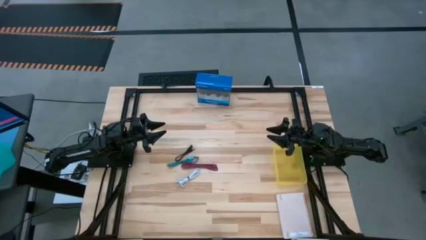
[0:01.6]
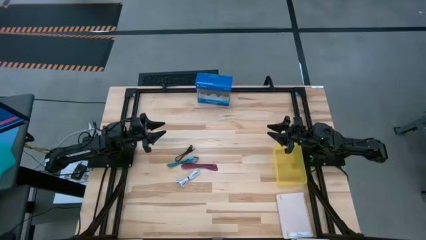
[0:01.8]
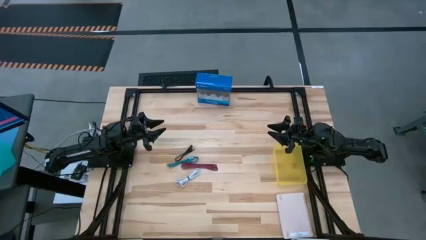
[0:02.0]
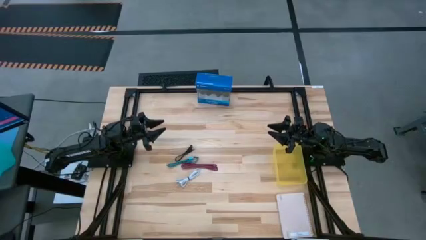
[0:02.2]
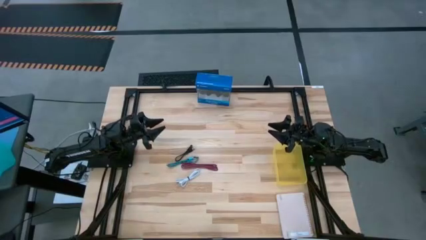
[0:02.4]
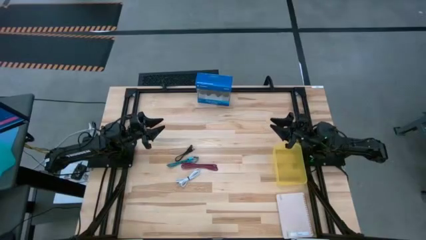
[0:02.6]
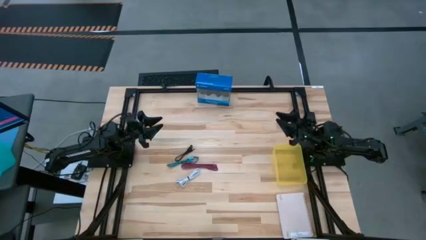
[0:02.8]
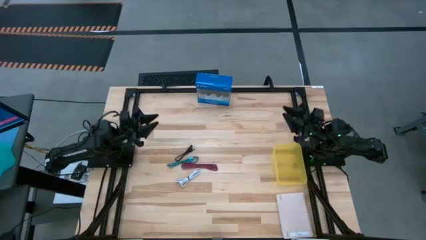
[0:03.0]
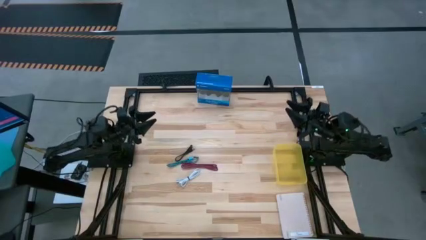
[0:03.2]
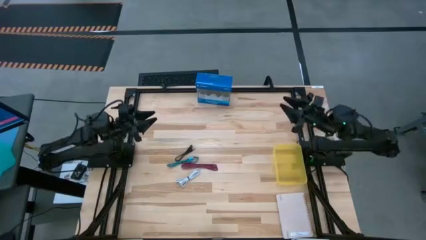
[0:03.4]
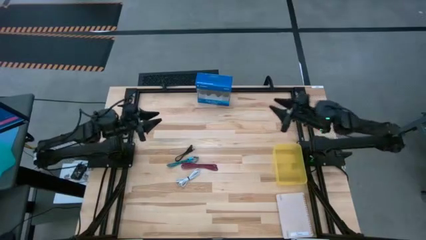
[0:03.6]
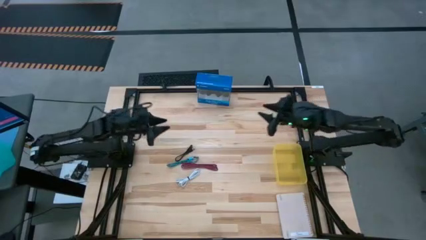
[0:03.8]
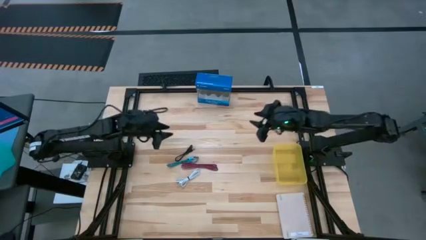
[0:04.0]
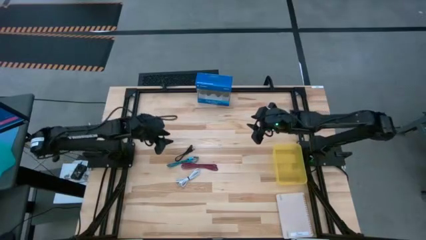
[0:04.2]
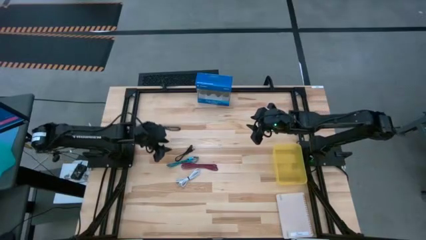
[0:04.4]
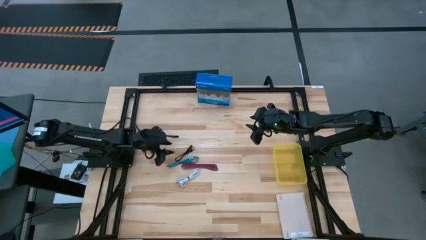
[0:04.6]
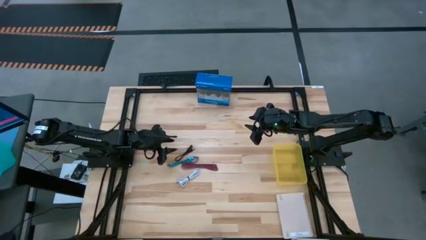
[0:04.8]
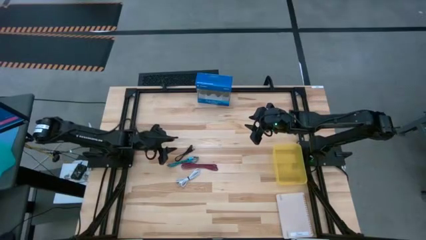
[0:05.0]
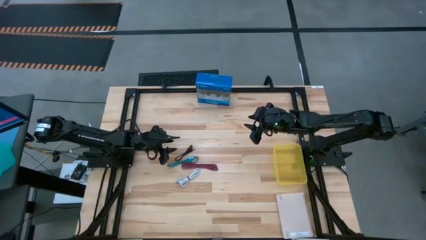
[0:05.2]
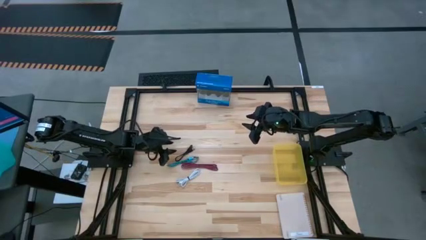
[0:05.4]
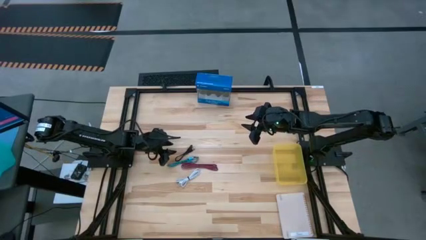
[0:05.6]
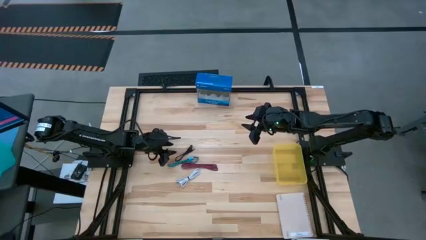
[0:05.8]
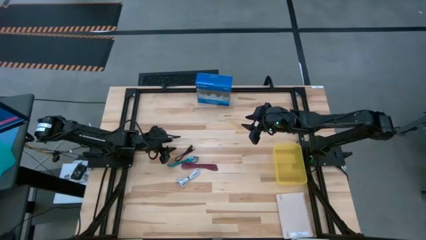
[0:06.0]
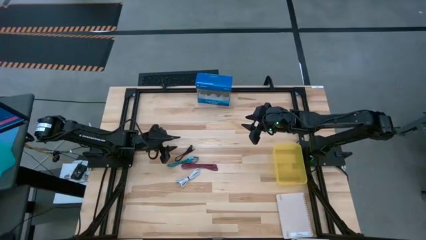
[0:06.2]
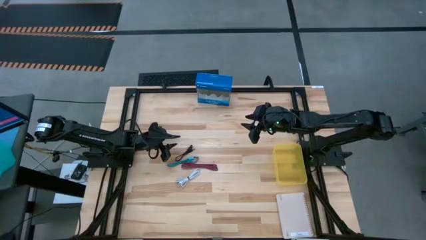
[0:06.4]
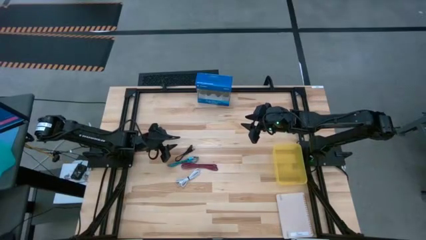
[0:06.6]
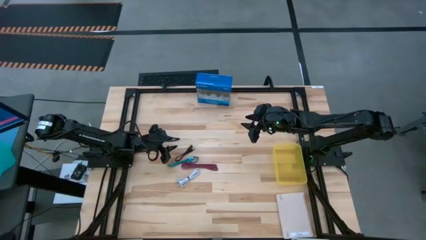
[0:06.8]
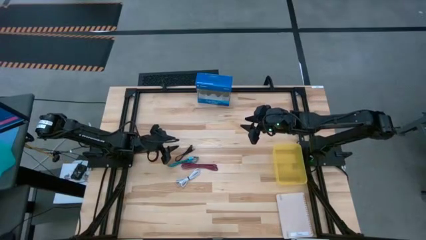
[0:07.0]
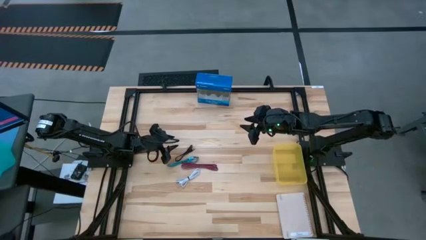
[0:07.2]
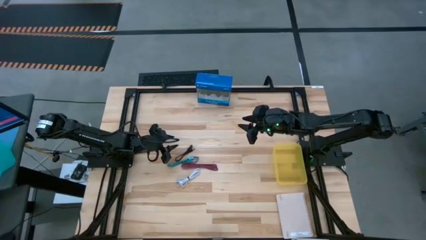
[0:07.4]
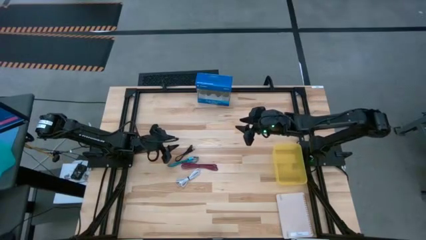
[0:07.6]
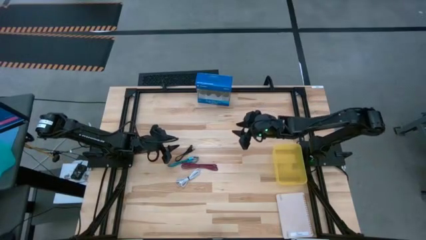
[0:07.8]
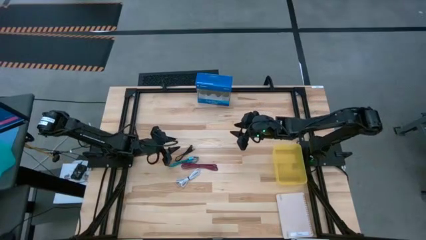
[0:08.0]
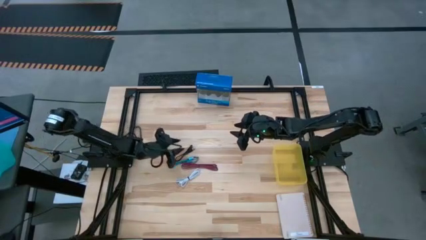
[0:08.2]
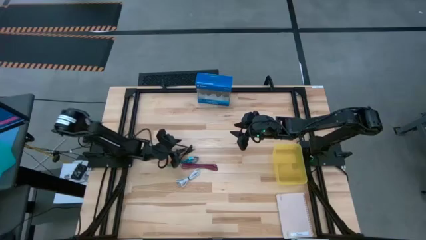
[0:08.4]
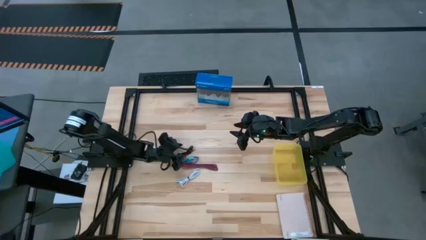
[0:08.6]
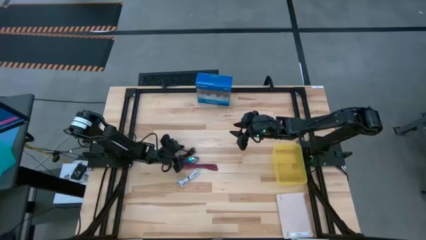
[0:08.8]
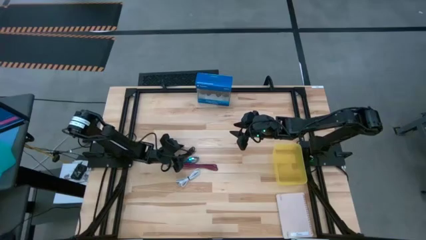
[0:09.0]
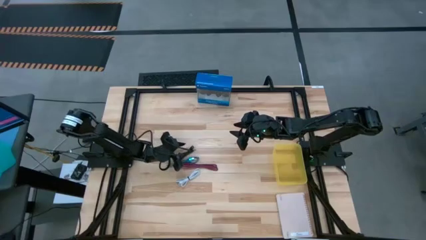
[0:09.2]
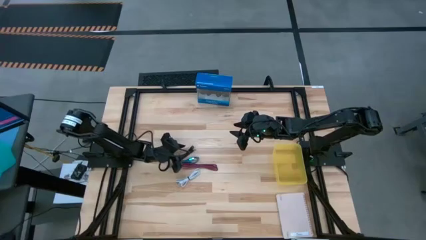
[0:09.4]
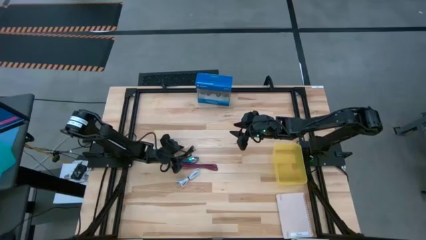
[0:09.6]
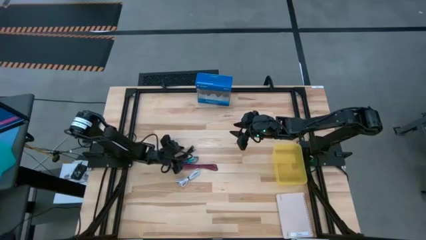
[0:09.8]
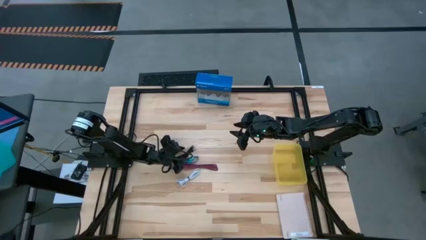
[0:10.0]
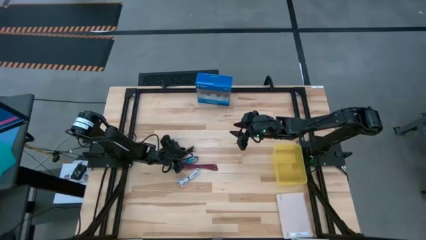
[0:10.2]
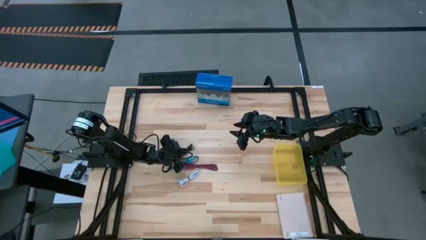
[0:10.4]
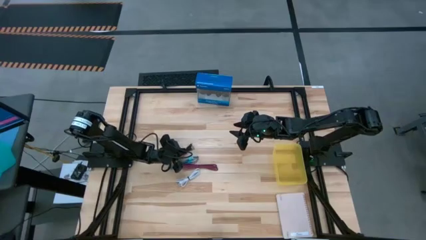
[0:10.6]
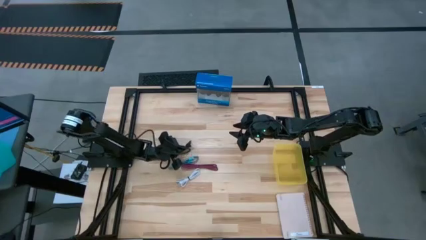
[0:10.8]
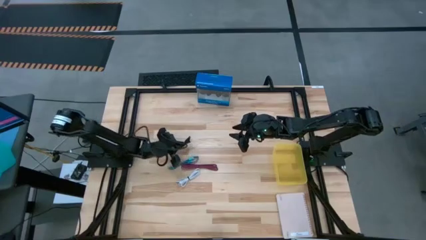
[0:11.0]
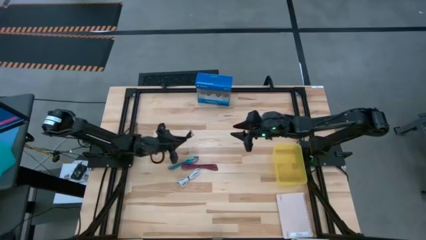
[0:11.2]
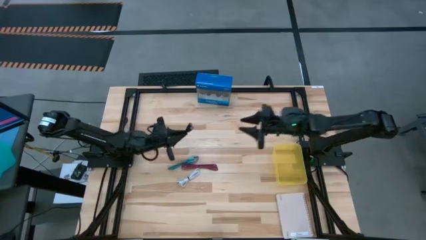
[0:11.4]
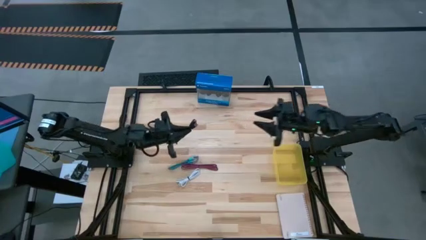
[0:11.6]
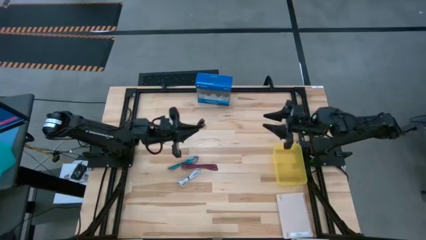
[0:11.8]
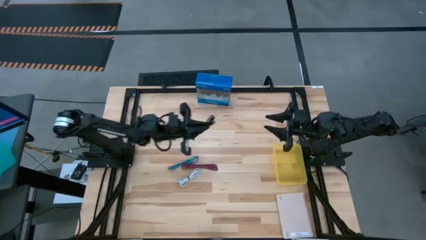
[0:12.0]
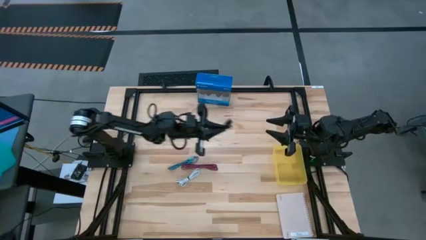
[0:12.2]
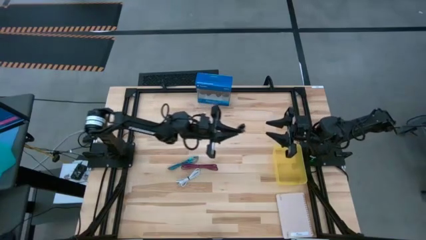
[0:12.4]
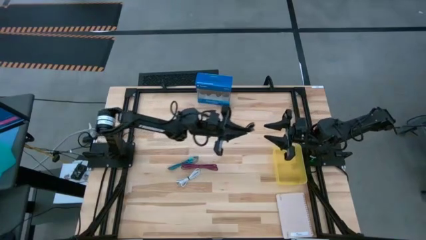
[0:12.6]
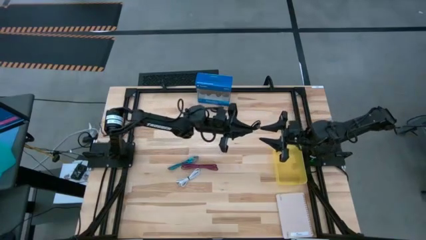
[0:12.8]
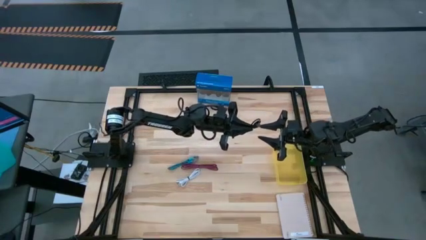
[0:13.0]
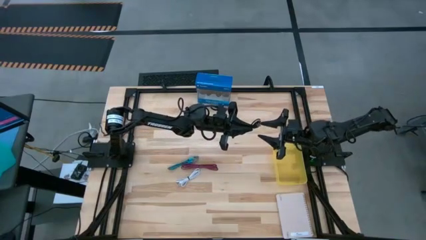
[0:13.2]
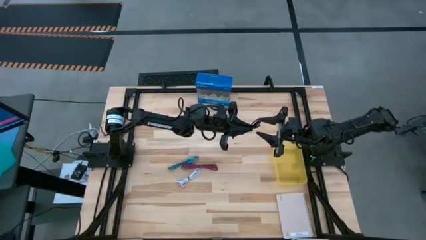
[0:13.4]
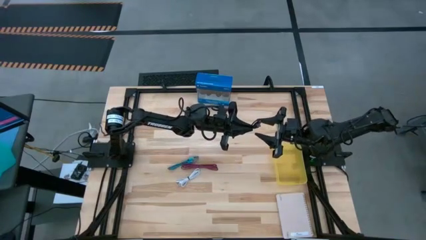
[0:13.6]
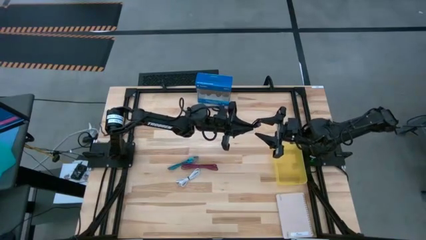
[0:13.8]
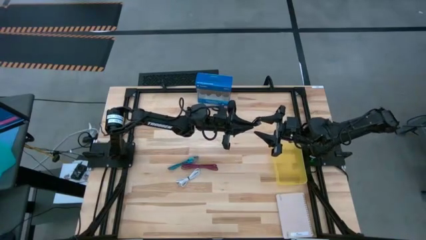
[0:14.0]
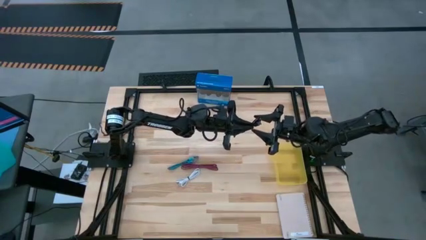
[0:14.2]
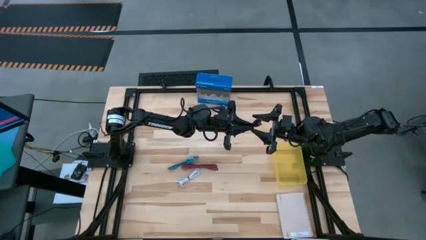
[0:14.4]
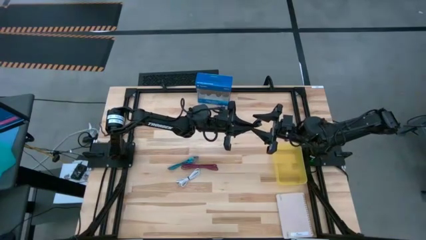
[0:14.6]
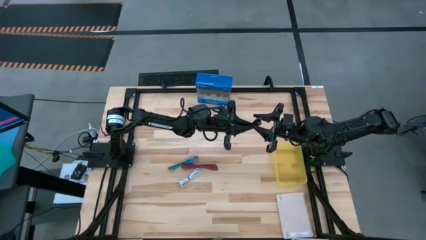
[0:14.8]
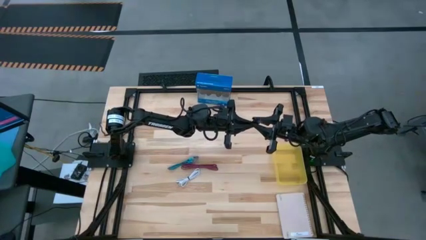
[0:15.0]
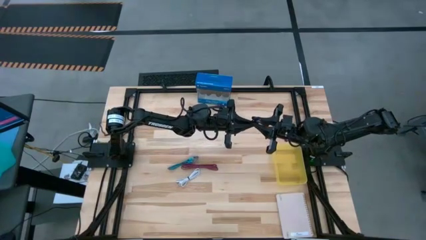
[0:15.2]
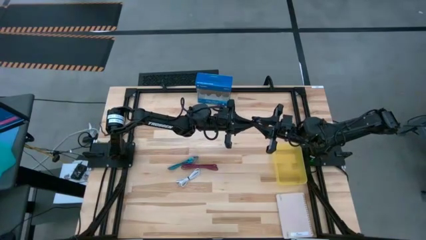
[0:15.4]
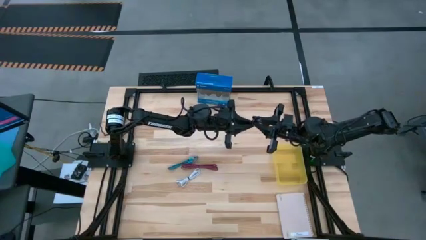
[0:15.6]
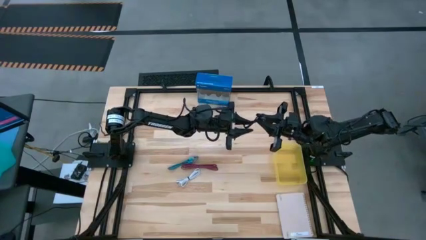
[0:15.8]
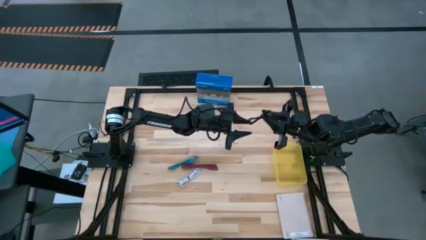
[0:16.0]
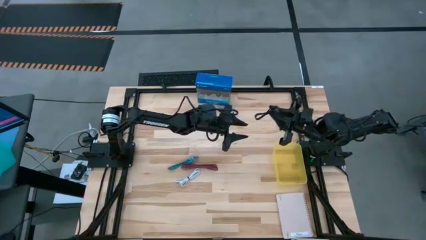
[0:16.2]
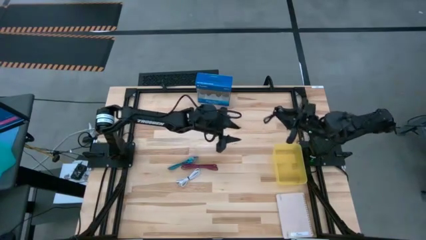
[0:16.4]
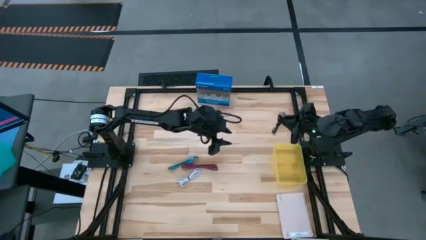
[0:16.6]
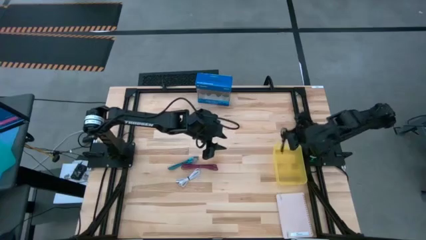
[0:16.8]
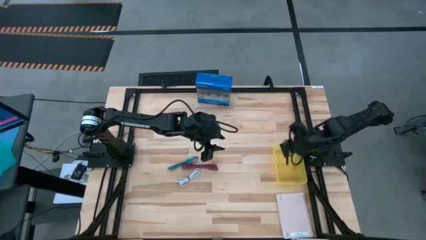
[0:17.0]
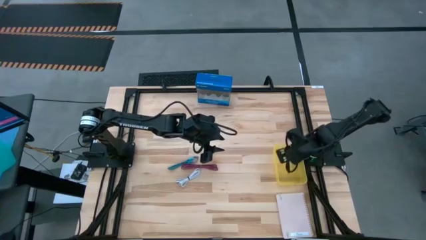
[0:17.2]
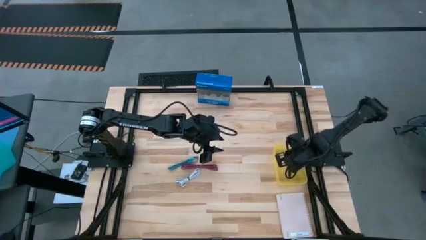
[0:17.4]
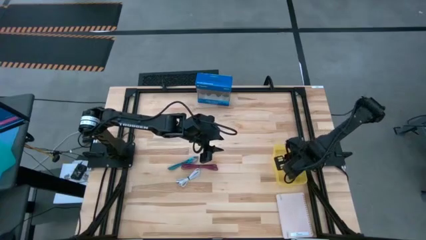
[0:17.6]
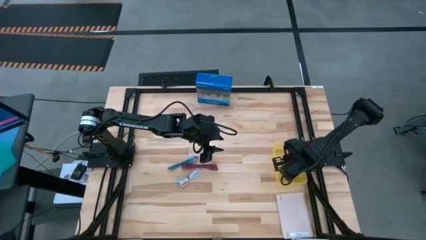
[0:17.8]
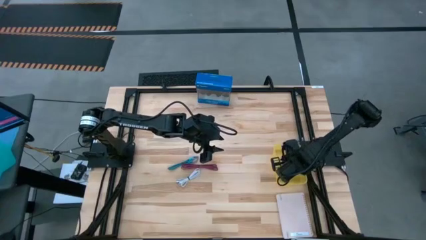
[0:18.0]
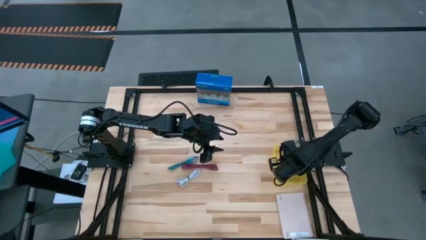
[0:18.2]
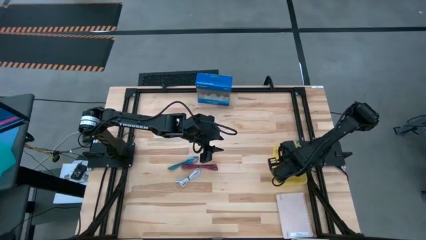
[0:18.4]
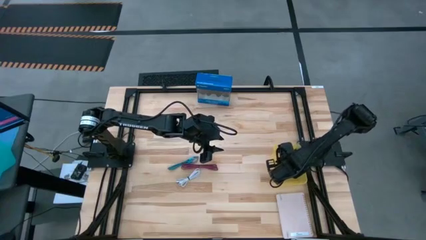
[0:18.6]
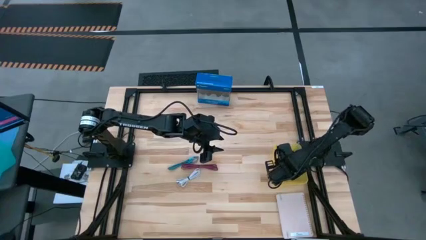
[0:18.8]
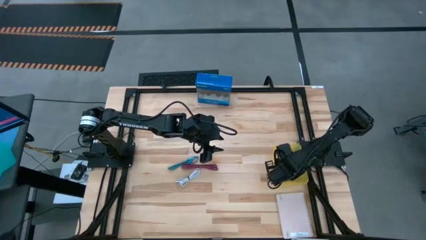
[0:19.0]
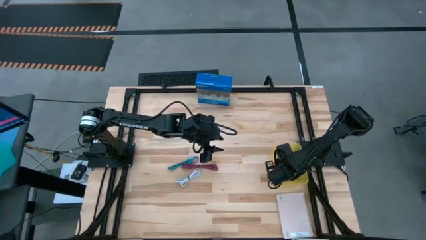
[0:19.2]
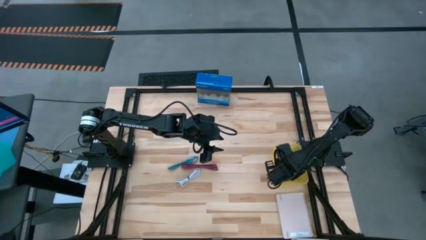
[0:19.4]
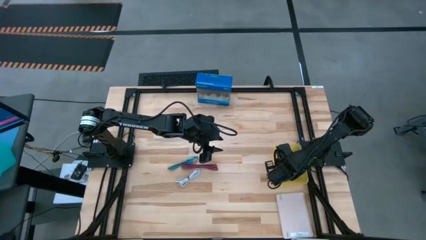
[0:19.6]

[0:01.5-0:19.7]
Task: Pick and place USB-C Cables
Put the black charger cable into the yellow bin
